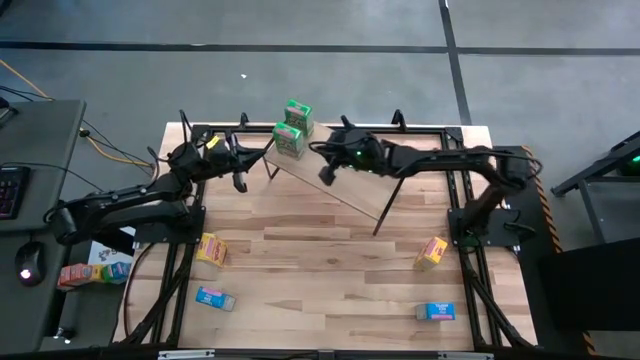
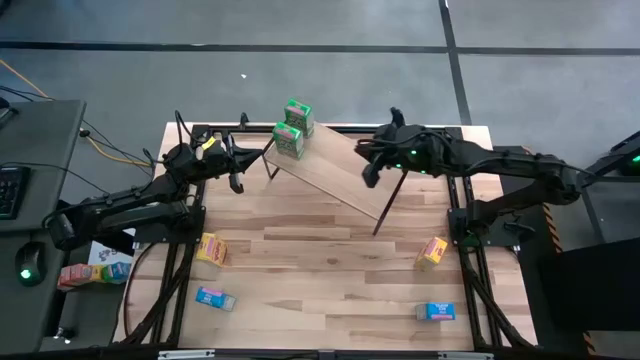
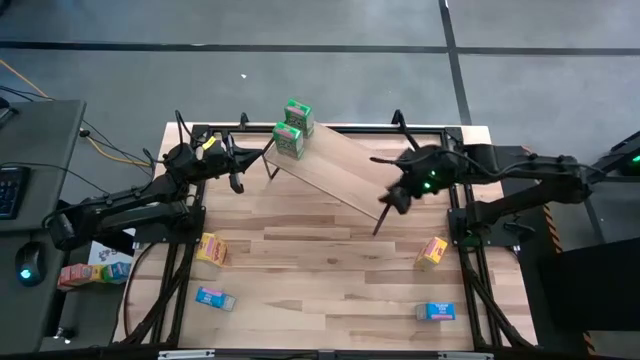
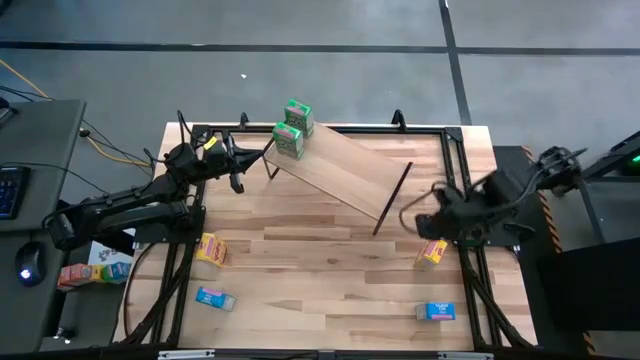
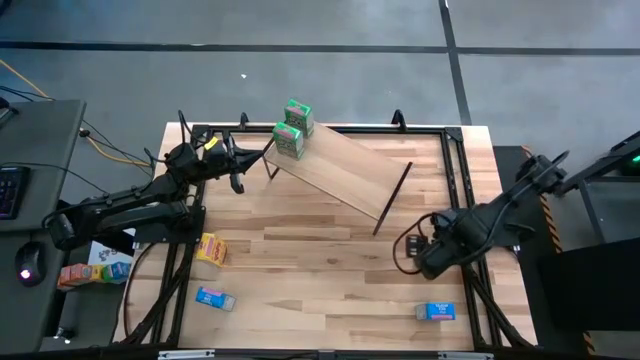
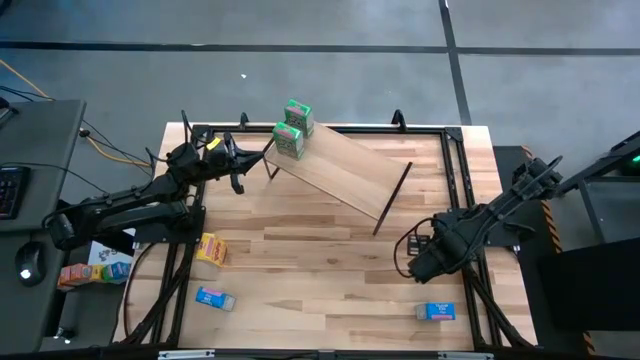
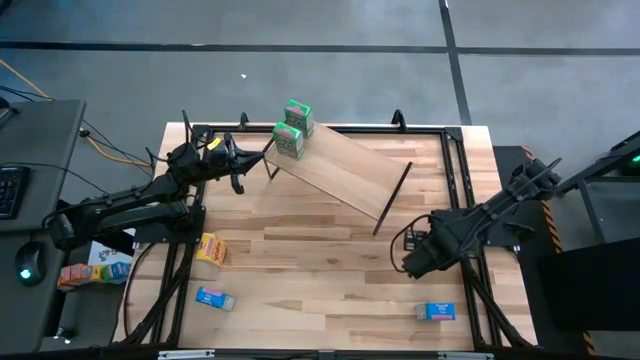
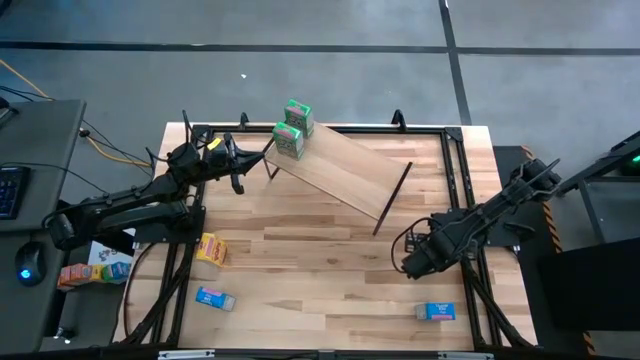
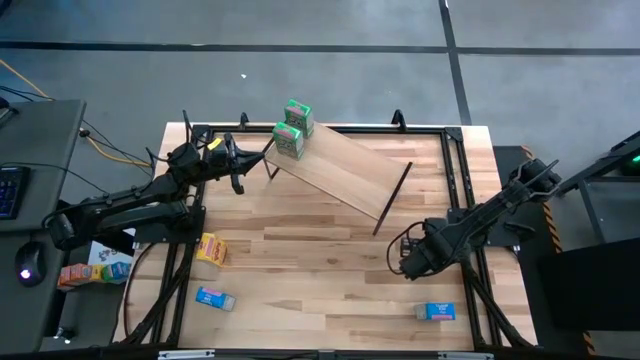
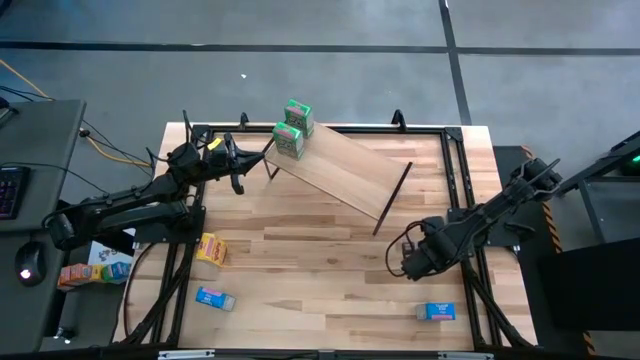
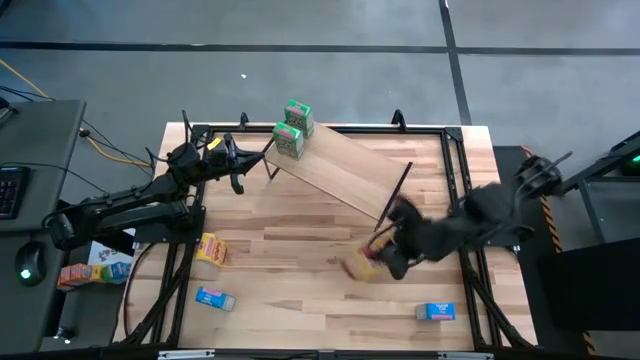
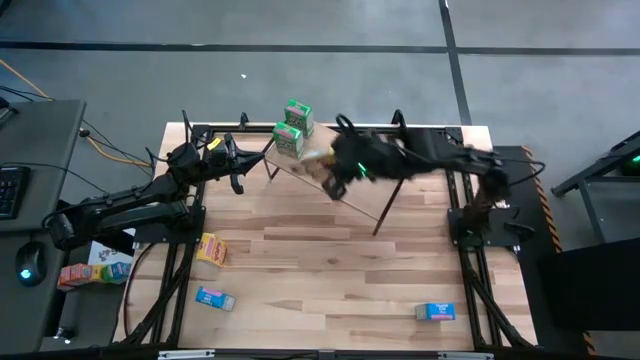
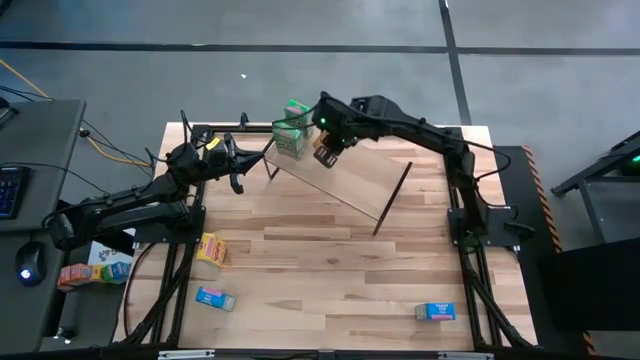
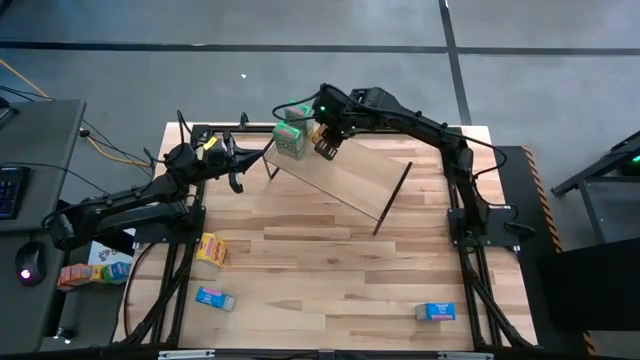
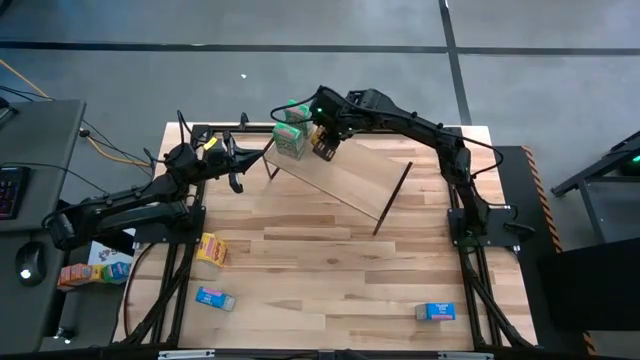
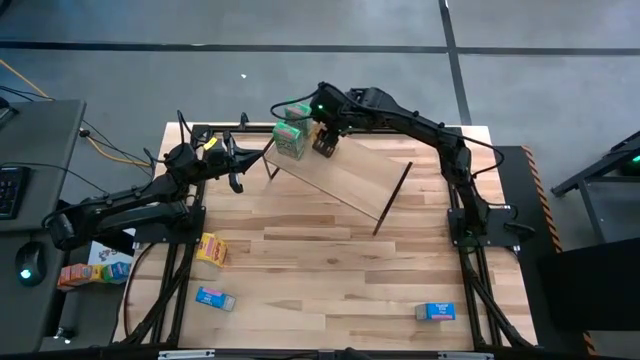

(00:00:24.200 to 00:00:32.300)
Task: Stack cereal on shelf
Put the right yellow cereal box on the shelf

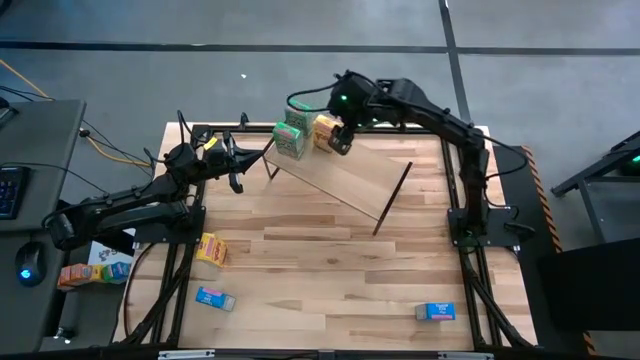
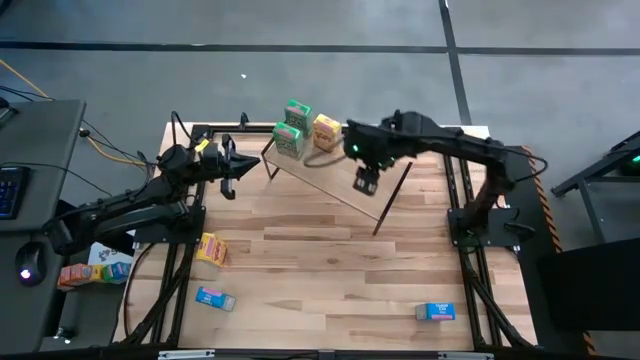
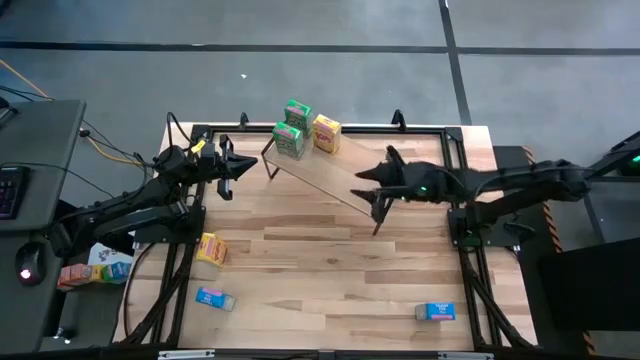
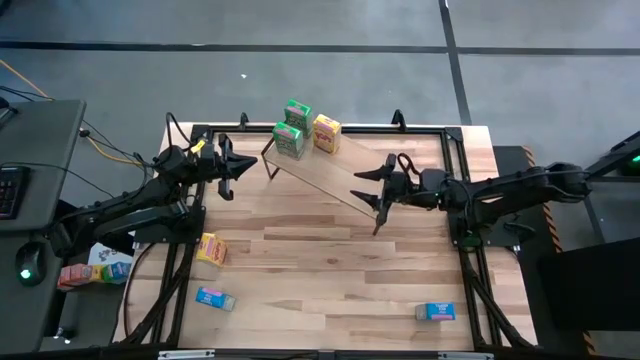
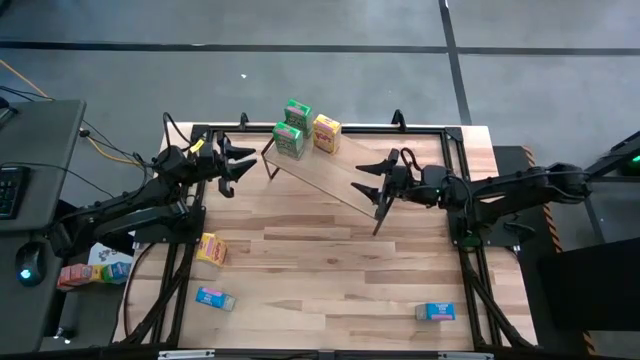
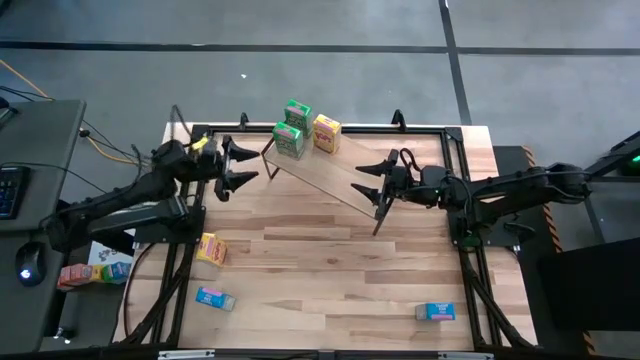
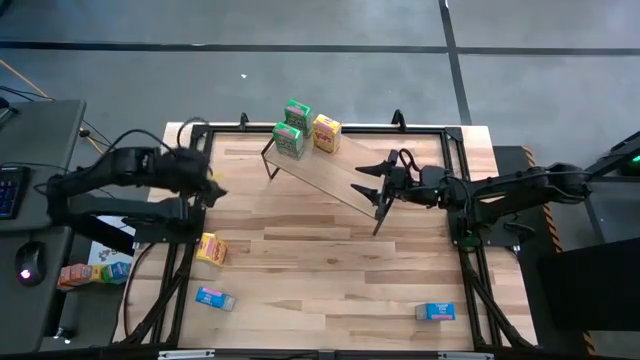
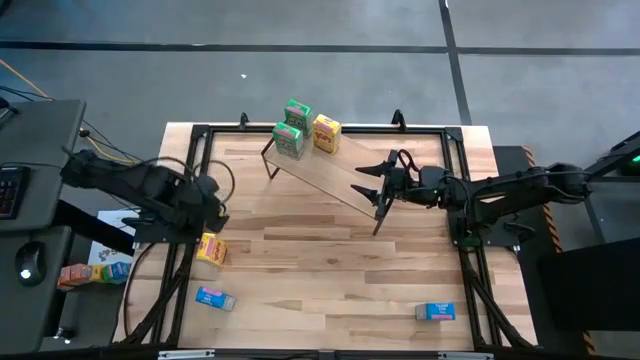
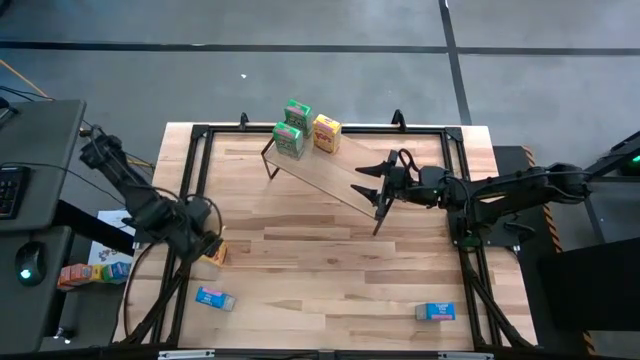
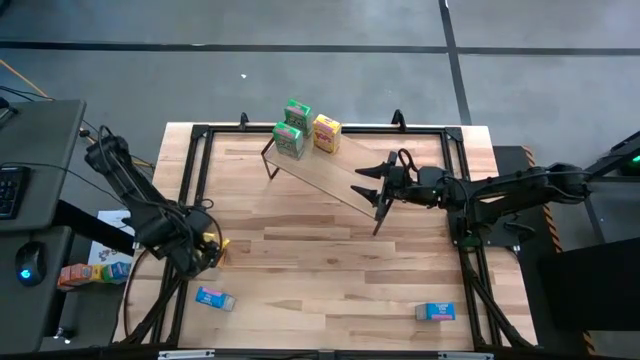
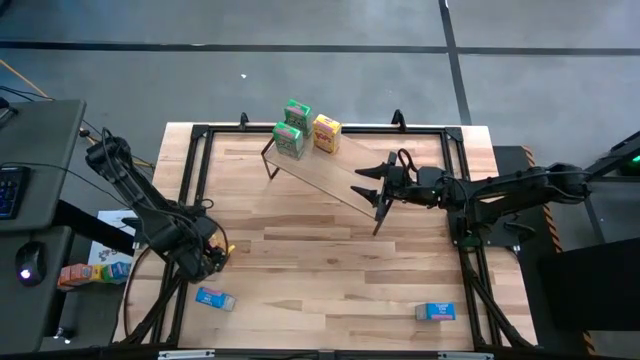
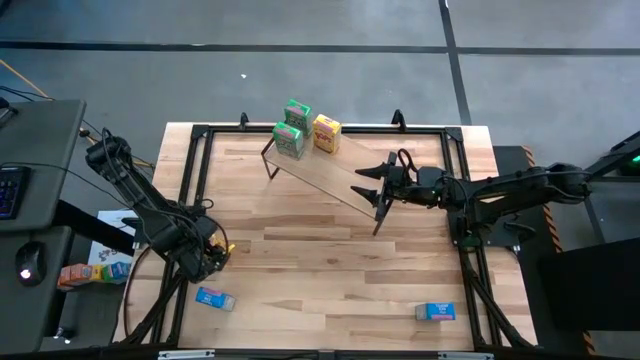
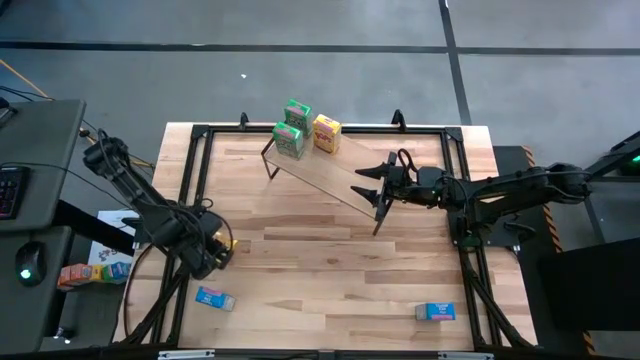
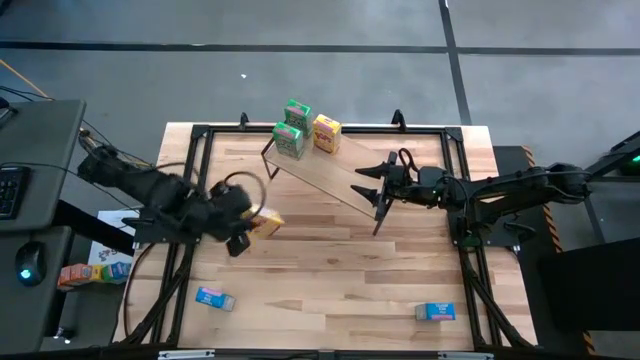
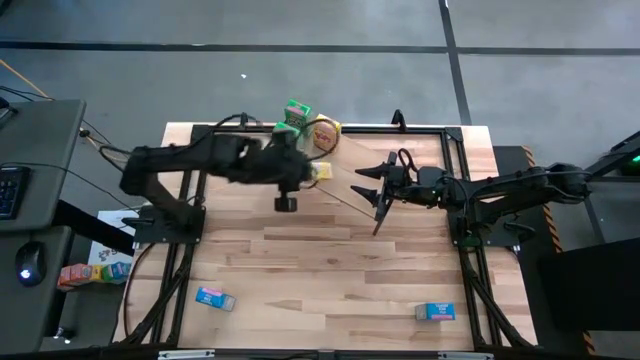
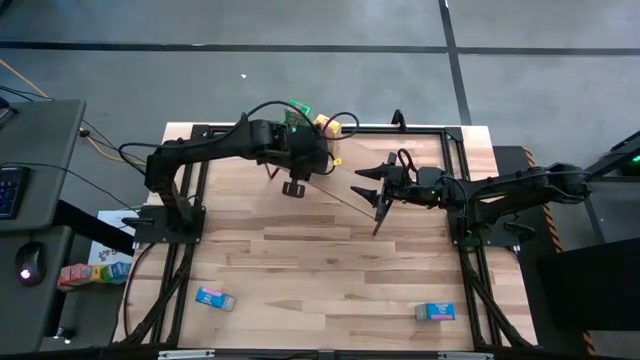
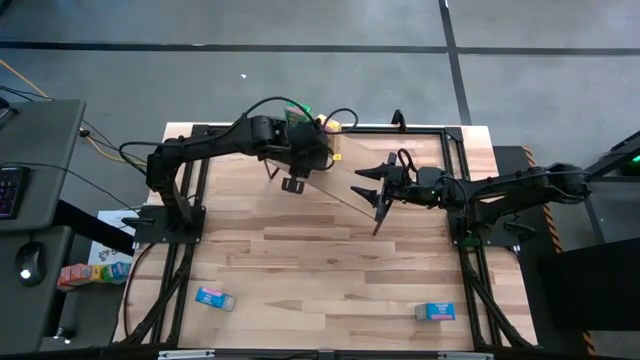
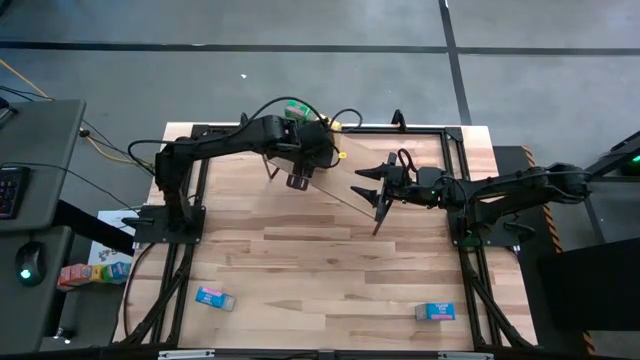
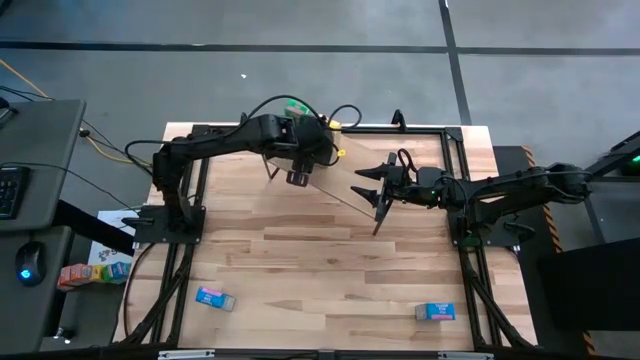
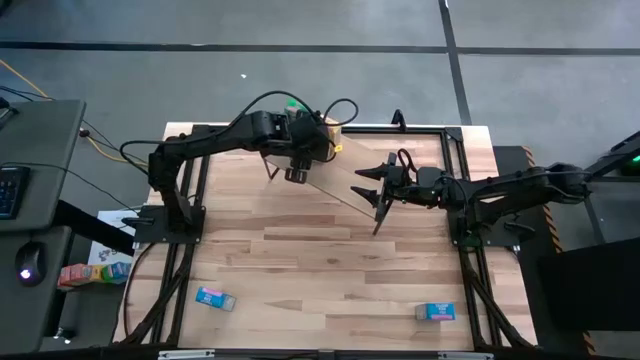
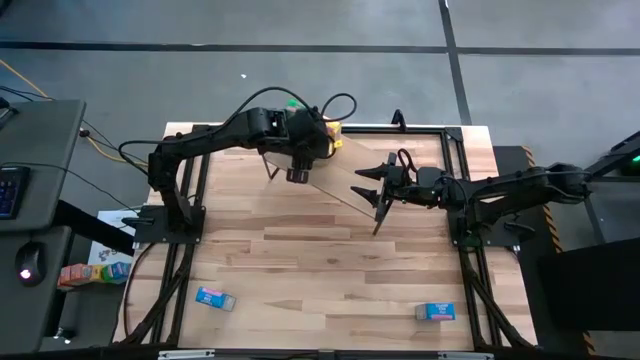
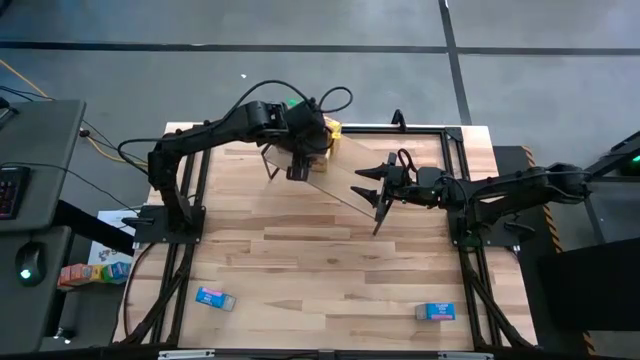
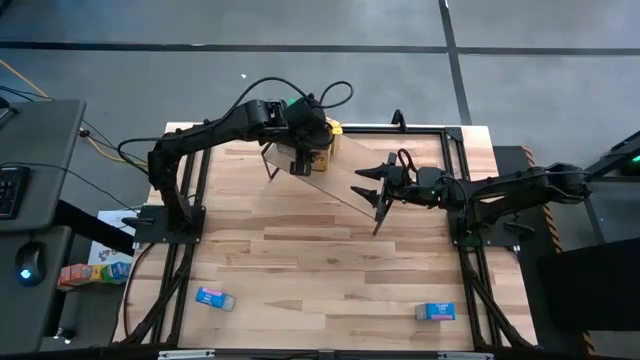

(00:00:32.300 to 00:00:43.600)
Put the yellow cereal box on the shelf aligned with the other yellow cereal box

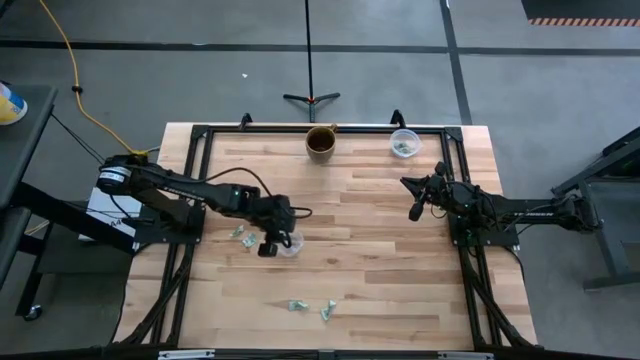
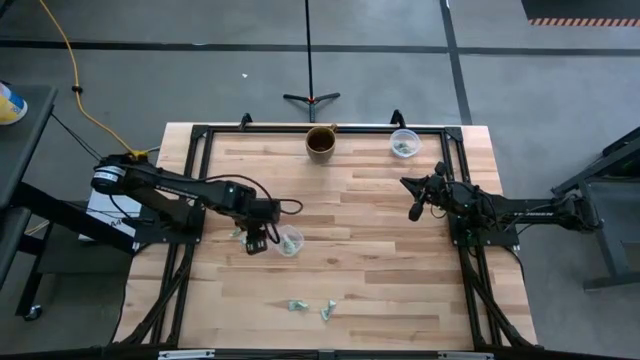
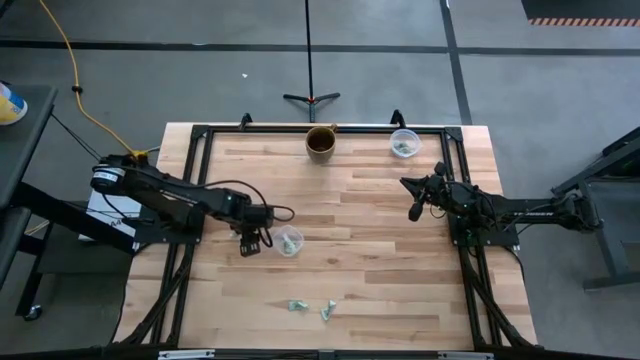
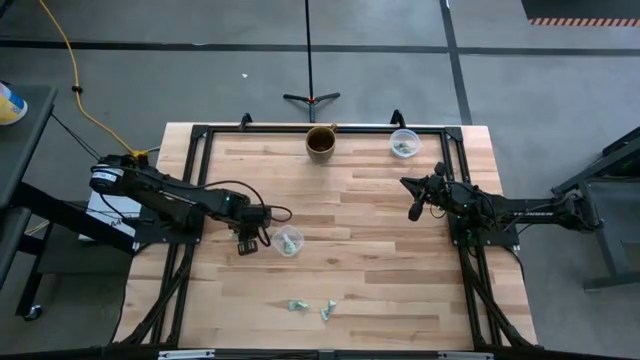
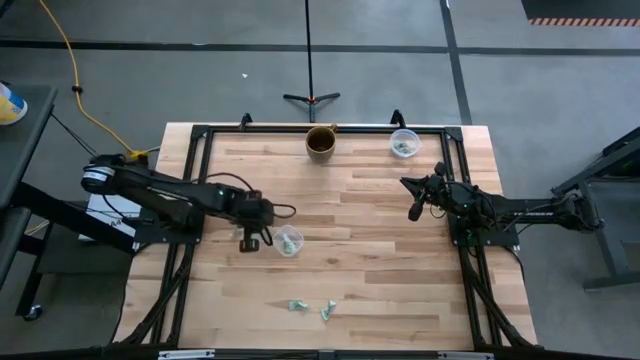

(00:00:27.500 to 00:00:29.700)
Task: Pick and place items into bin
Put the stevia packet into the bottom transparent bin
